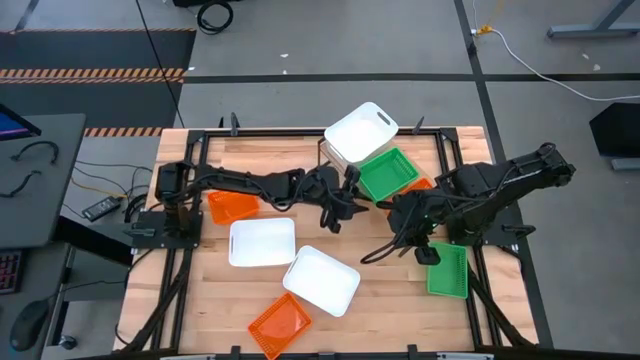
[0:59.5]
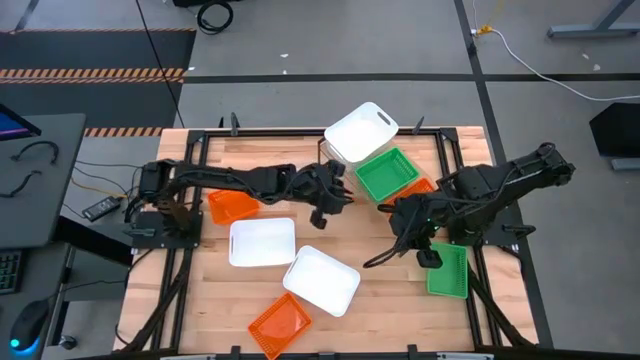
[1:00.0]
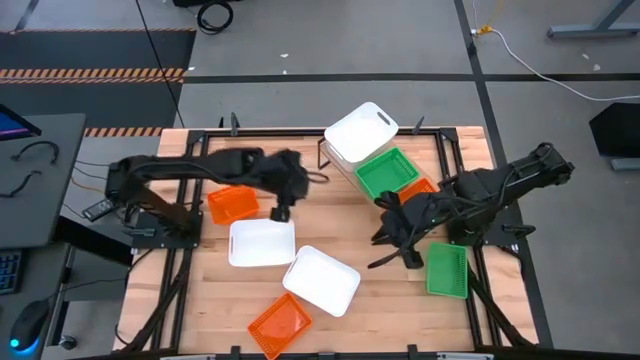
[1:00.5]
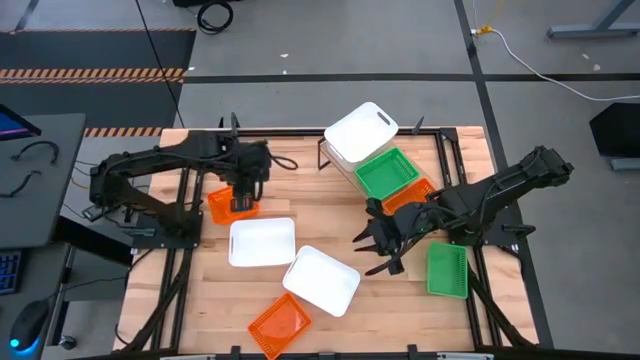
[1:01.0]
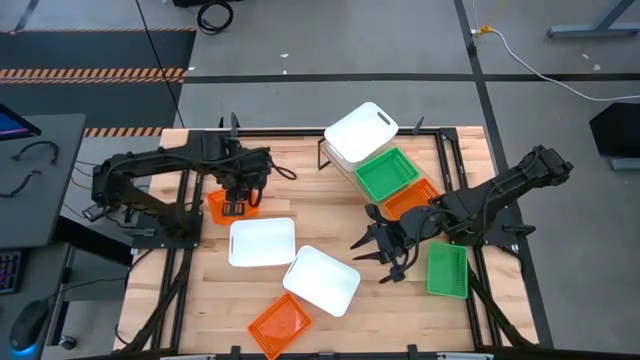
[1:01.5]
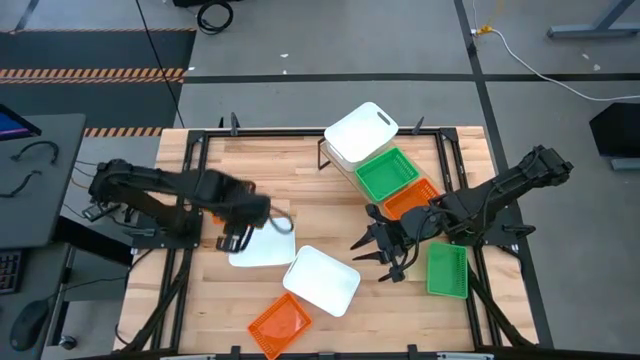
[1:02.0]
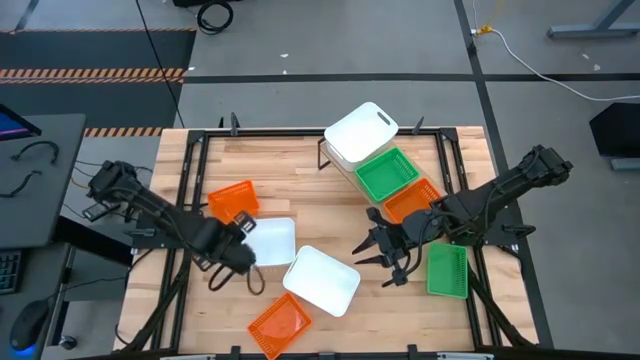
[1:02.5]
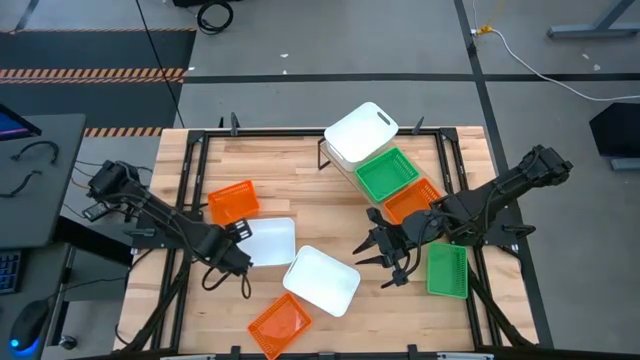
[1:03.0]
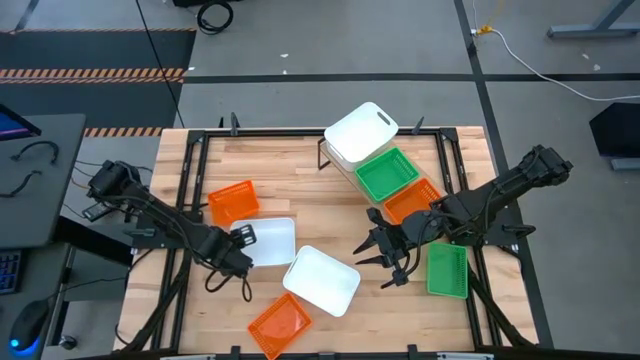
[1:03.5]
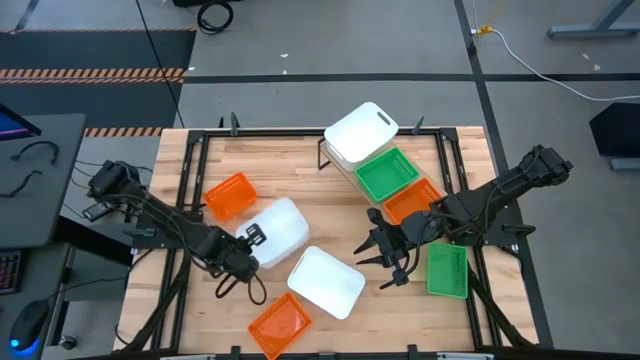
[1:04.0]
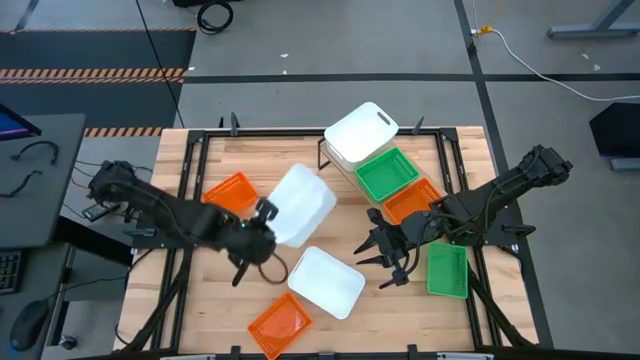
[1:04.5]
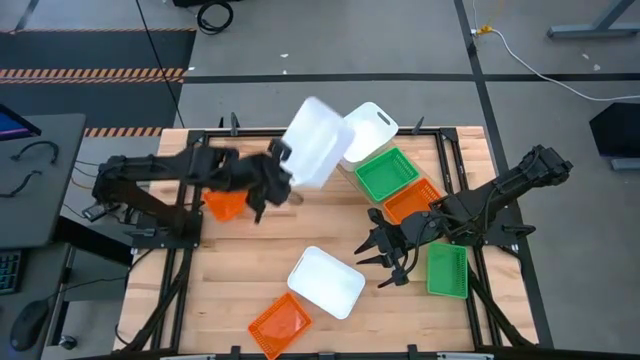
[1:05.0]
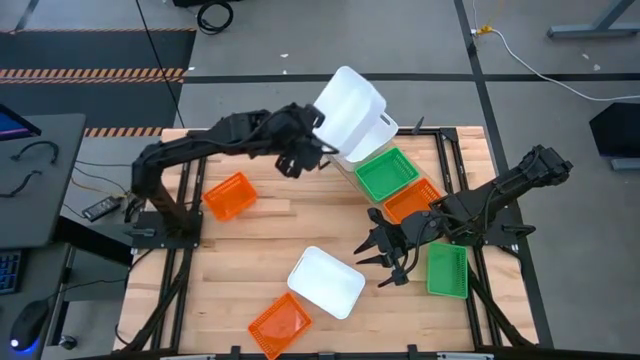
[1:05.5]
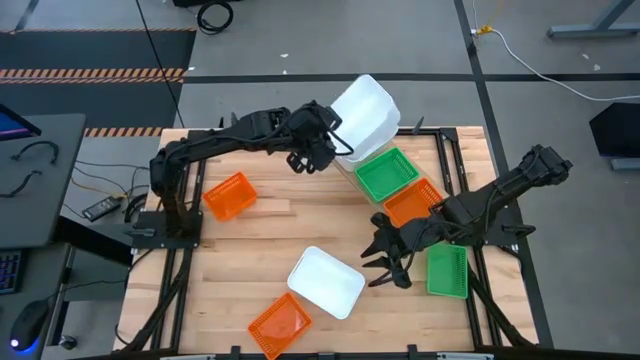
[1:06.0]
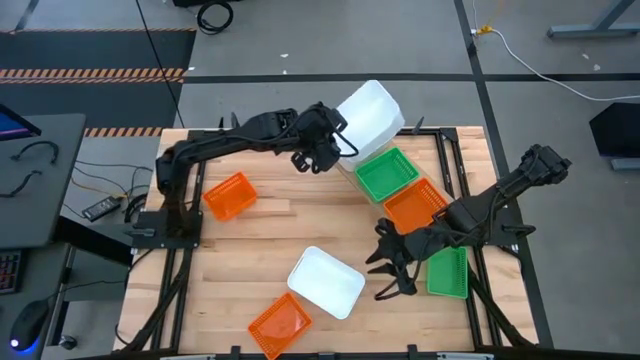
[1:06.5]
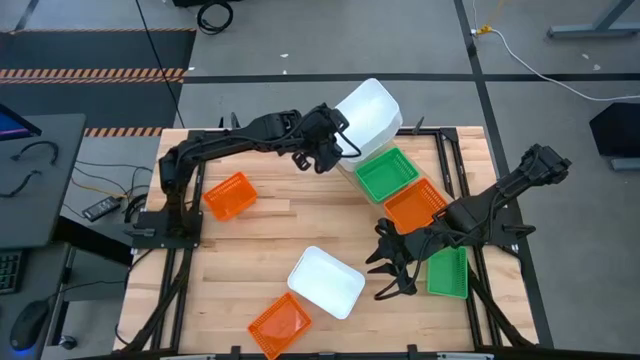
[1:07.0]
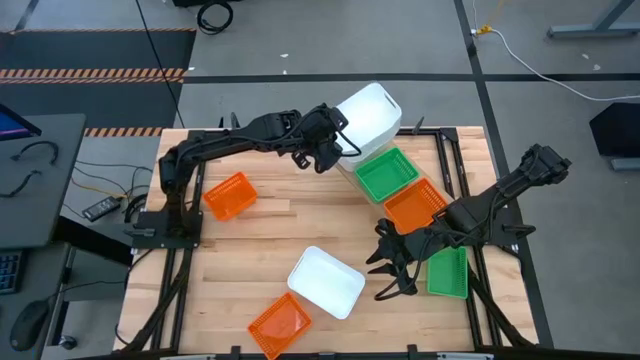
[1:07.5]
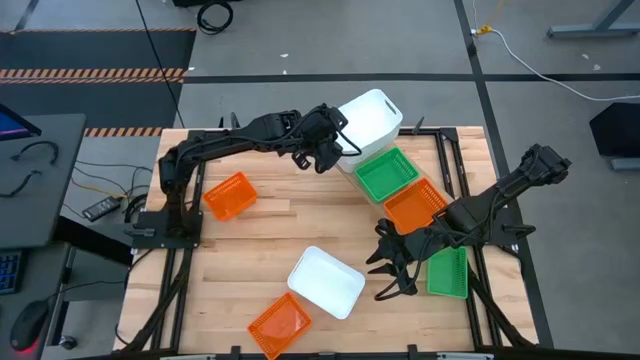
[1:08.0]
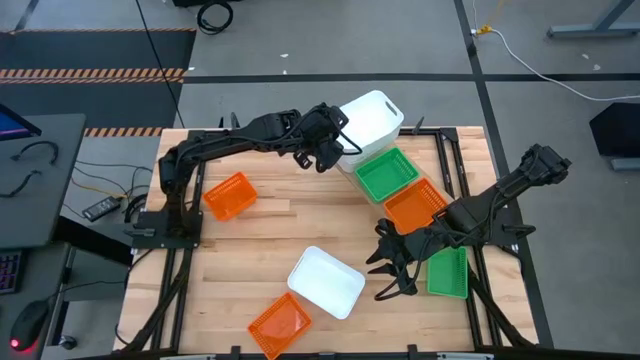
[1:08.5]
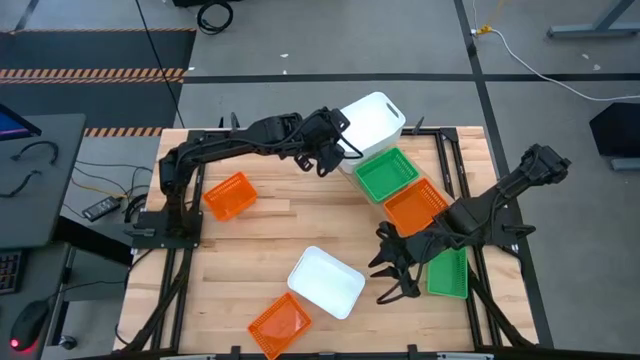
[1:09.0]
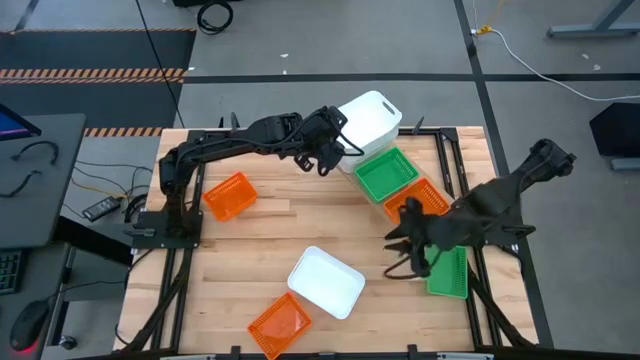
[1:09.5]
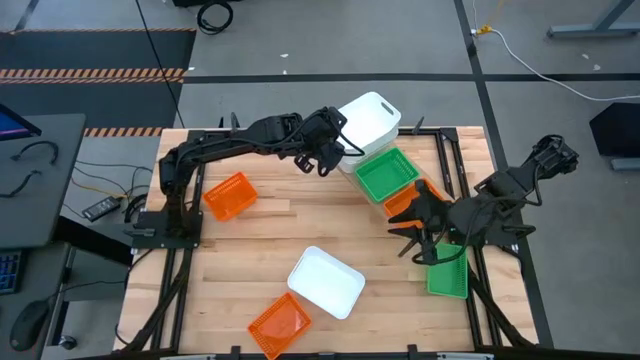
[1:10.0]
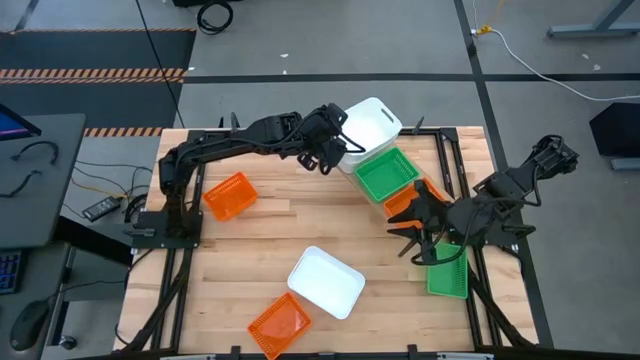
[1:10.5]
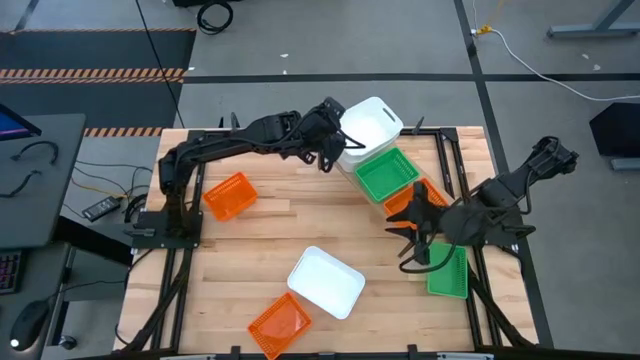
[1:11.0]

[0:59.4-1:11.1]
Task: Stack baskets on shelf by color
Stack the top white bin on top of the white bin on the shelf

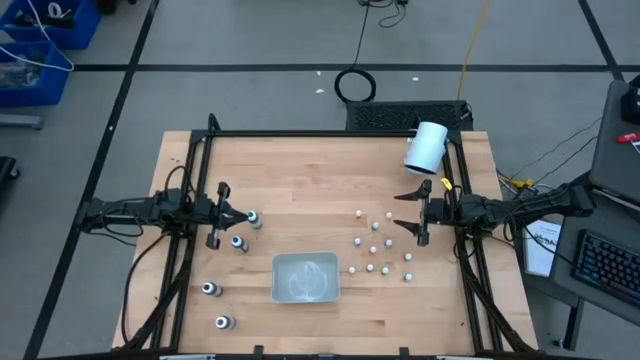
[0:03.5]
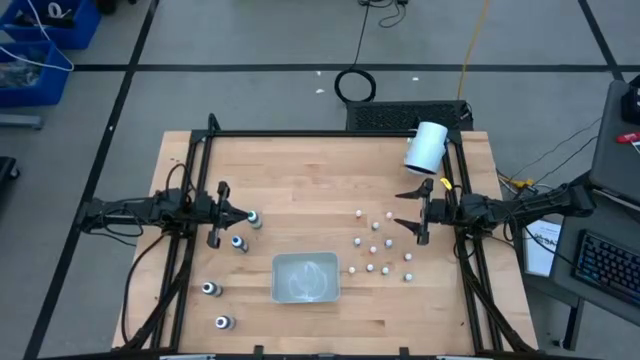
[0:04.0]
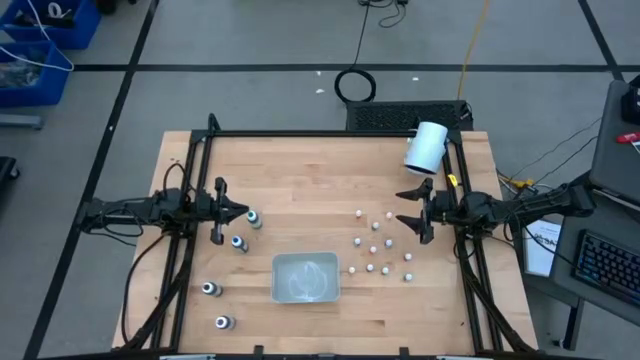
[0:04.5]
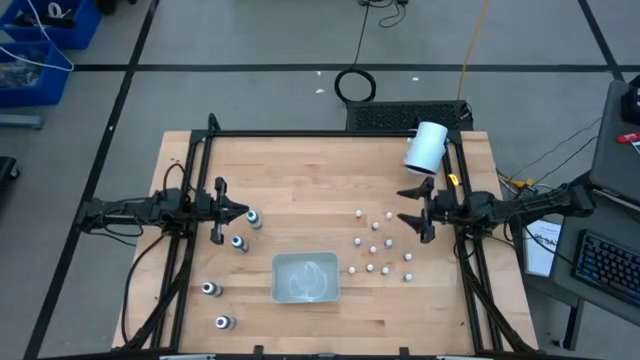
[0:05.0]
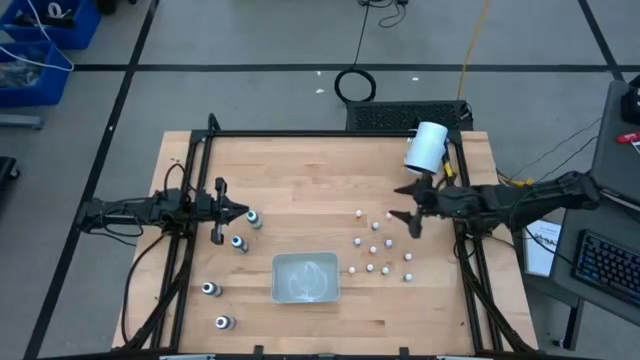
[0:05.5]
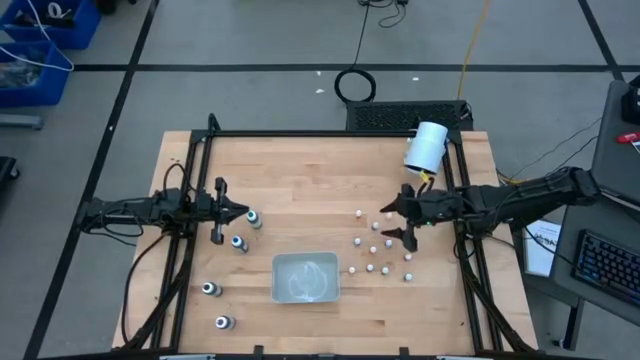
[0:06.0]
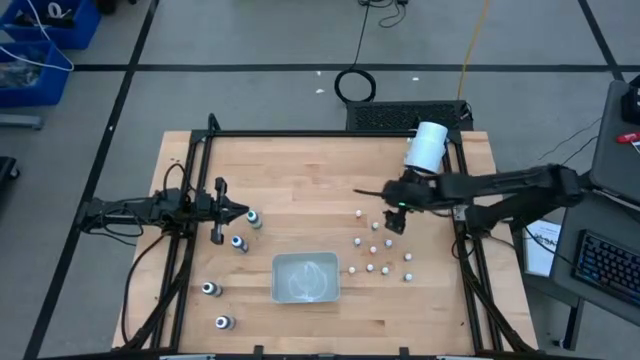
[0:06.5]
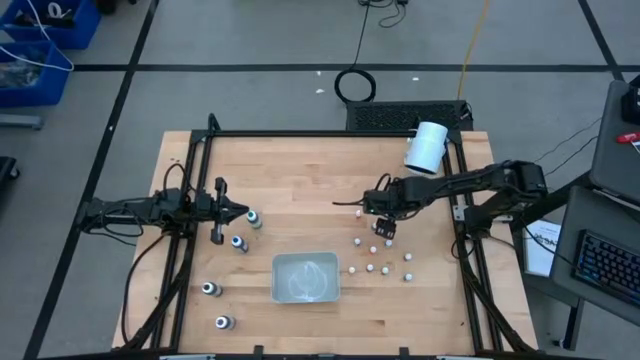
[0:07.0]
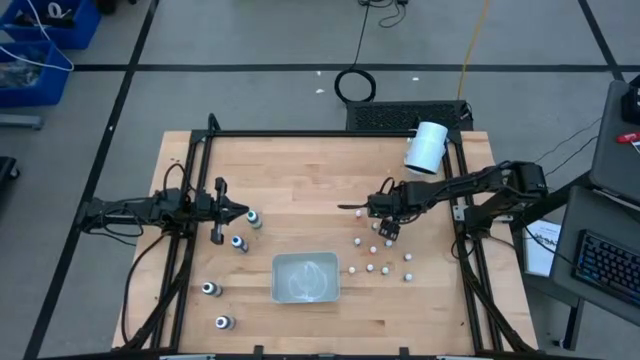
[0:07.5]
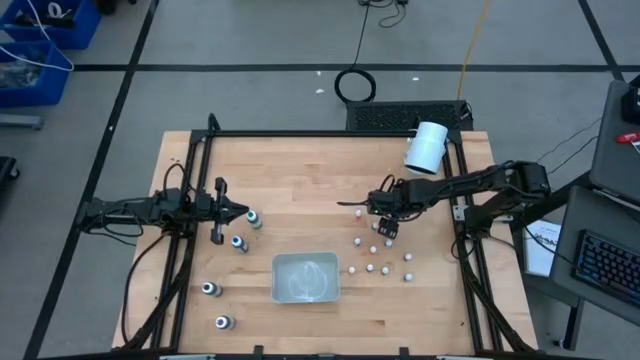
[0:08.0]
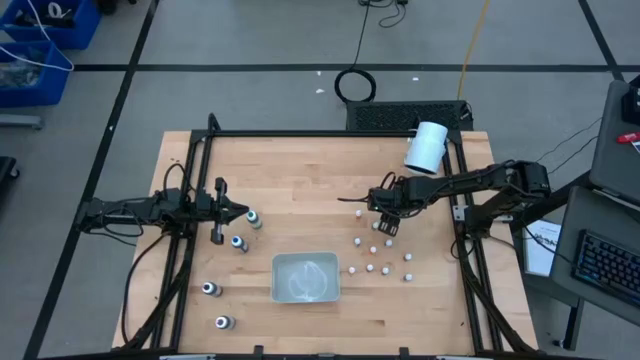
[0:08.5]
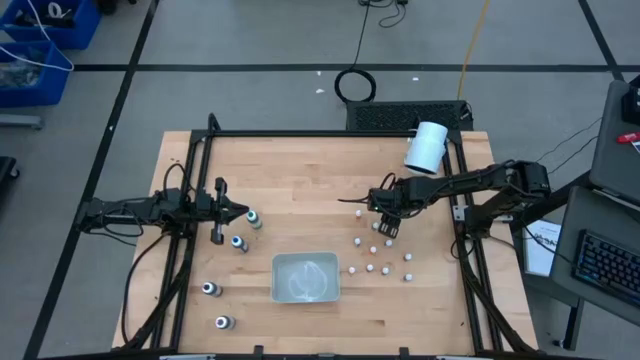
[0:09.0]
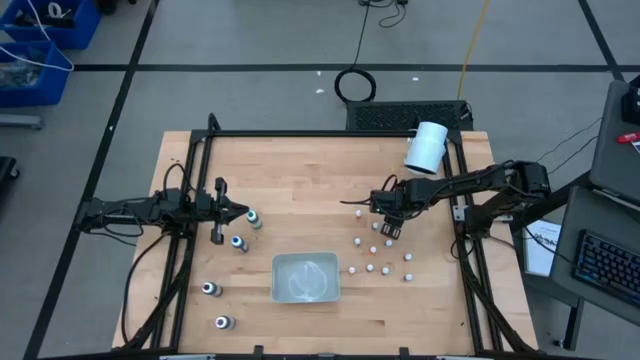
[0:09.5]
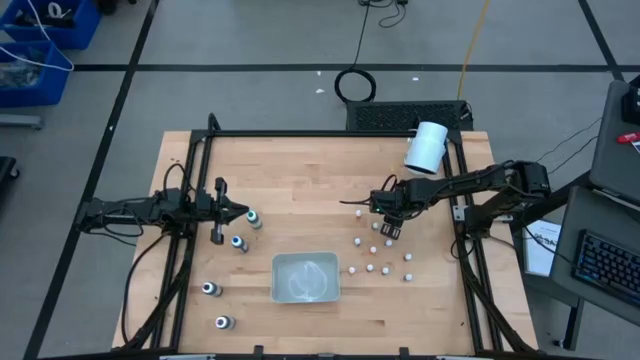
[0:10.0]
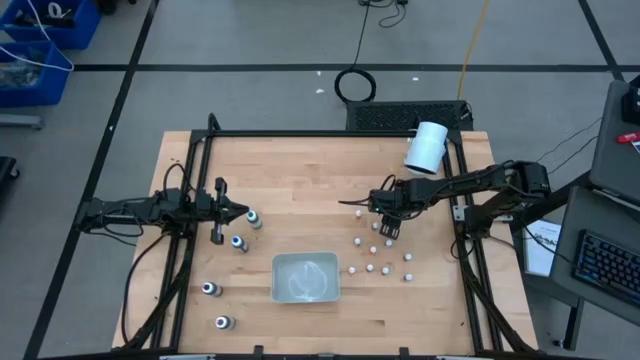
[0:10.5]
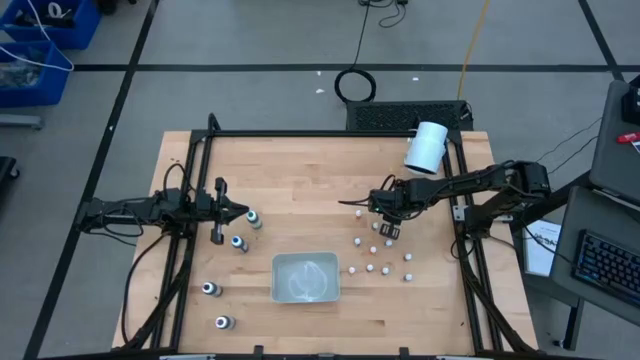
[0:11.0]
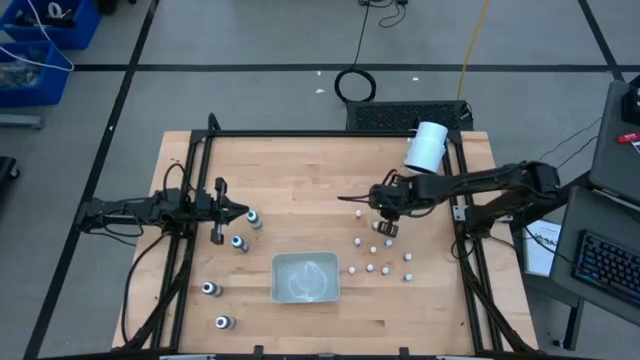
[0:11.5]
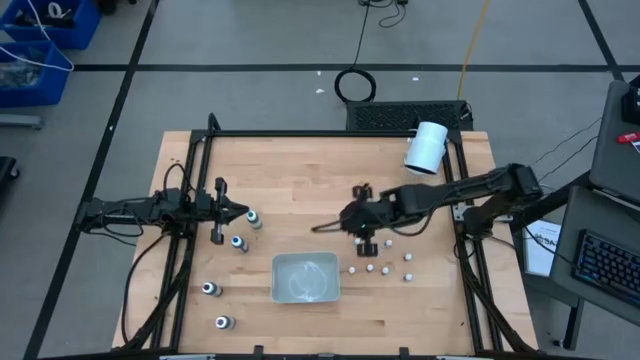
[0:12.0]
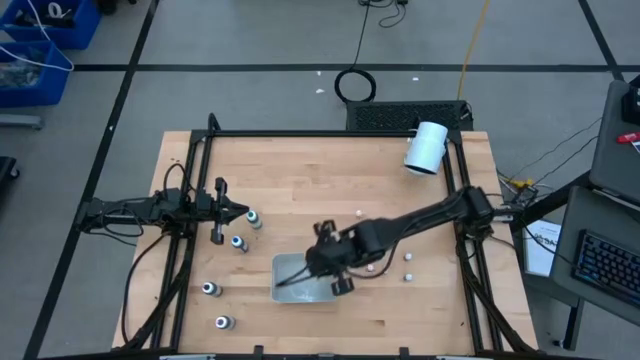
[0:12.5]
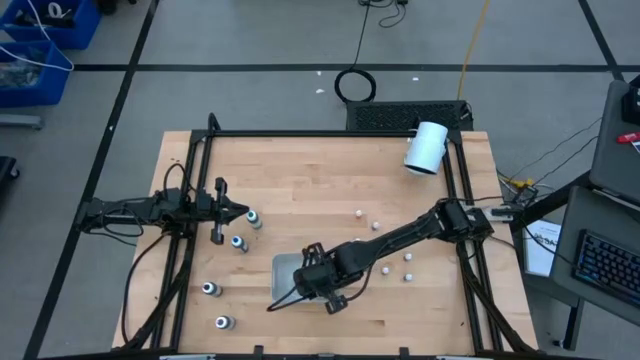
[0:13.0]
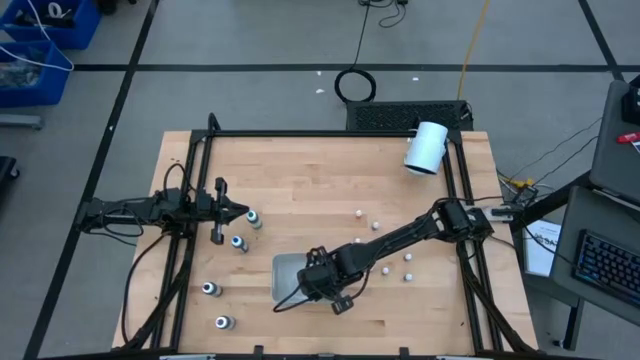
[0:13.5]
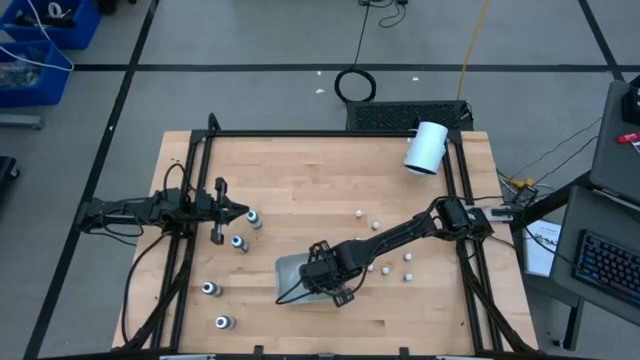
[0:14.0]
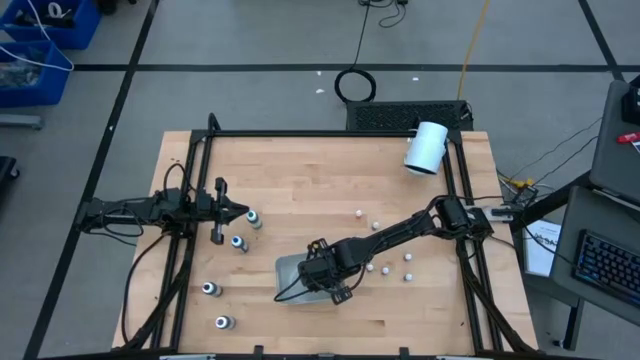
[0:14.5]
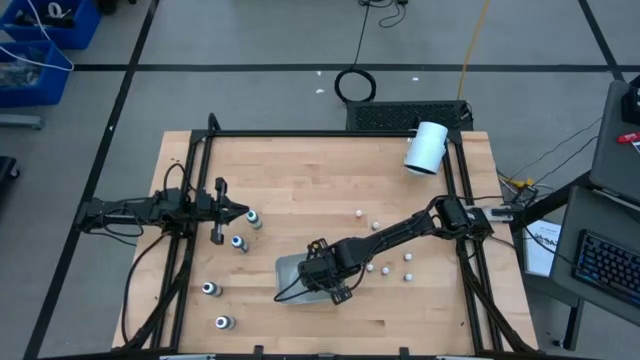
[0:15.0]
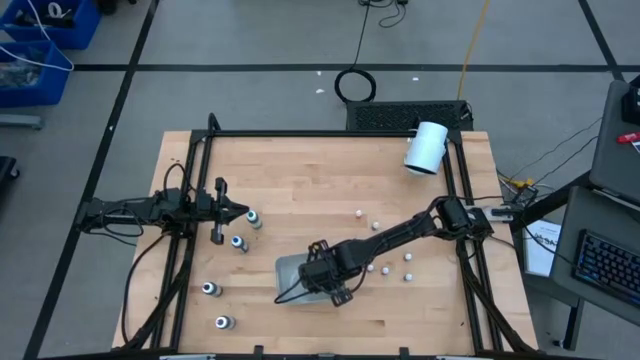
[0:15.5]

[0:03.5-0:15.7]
Task: Pick & Place food coloring
Put the small orange food coloring bottle in the gray bin
